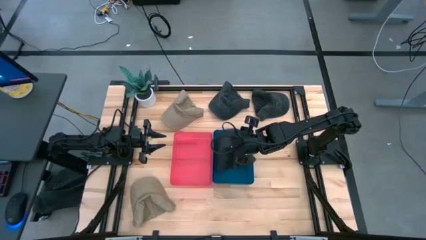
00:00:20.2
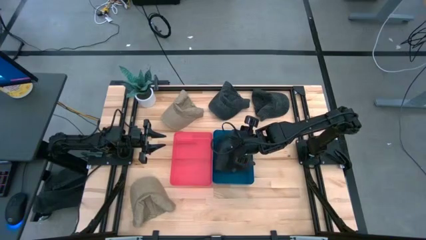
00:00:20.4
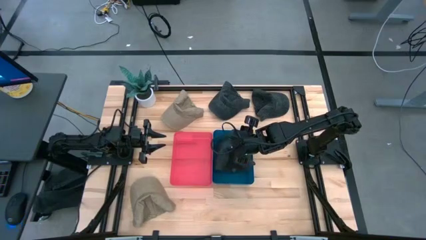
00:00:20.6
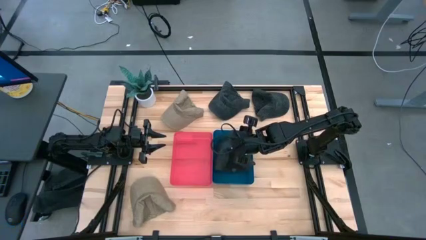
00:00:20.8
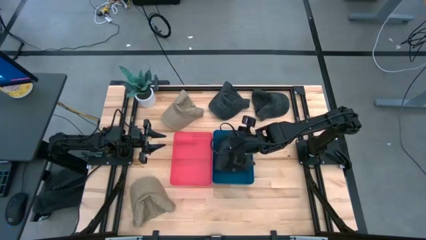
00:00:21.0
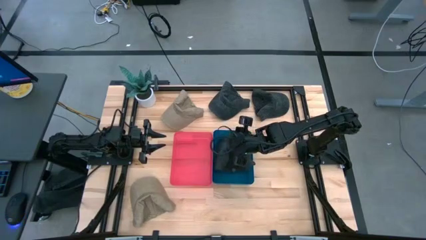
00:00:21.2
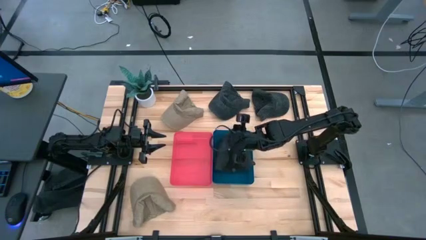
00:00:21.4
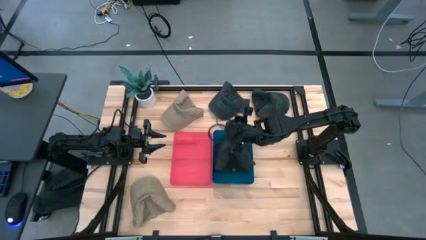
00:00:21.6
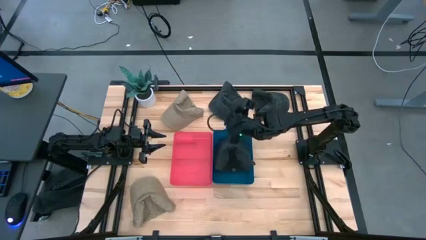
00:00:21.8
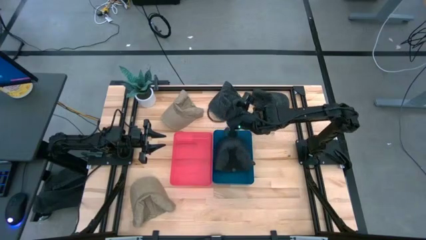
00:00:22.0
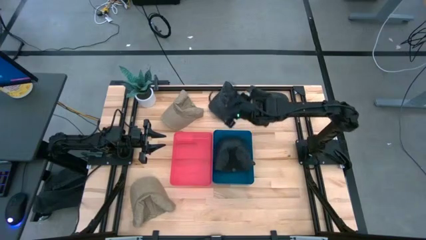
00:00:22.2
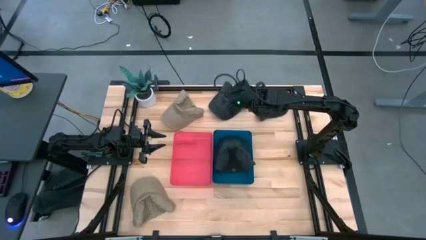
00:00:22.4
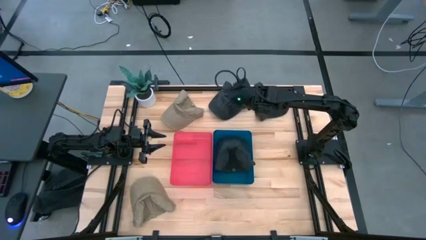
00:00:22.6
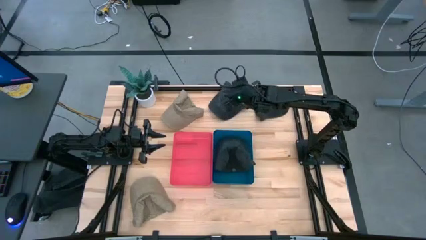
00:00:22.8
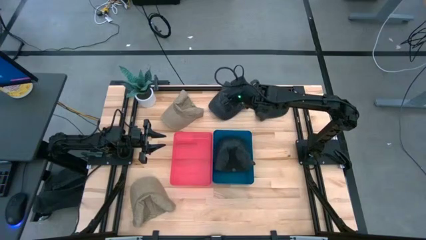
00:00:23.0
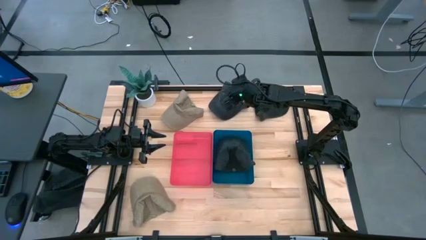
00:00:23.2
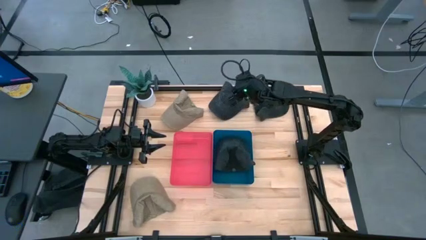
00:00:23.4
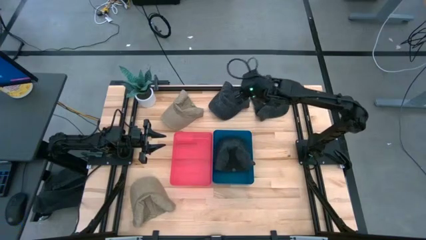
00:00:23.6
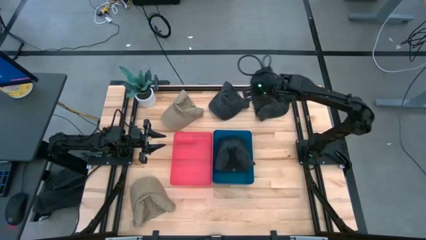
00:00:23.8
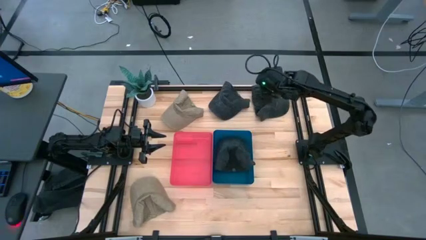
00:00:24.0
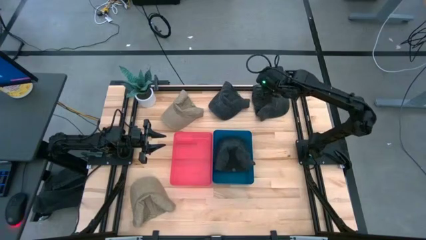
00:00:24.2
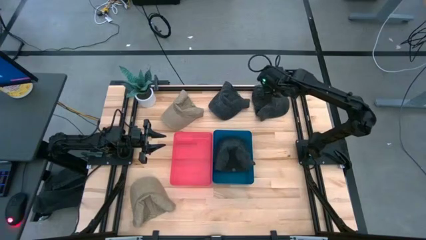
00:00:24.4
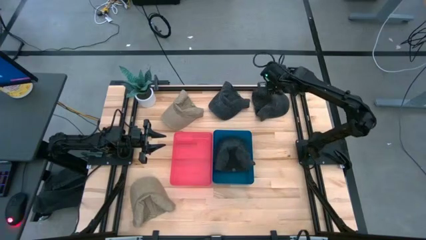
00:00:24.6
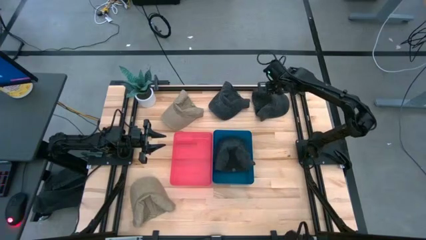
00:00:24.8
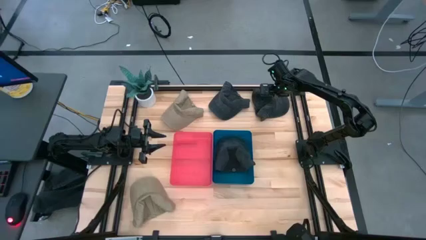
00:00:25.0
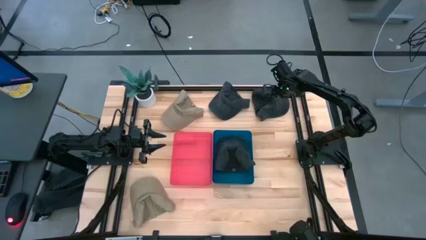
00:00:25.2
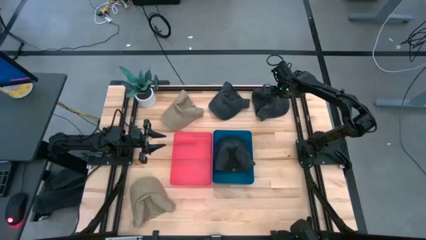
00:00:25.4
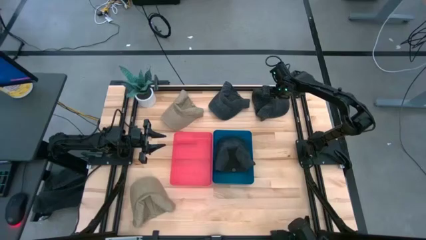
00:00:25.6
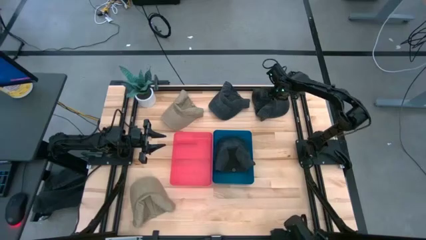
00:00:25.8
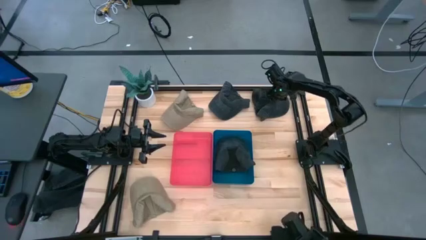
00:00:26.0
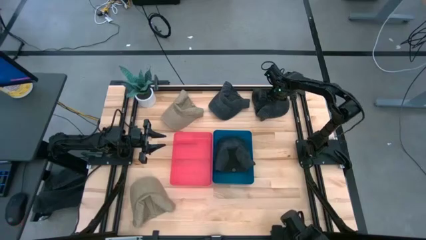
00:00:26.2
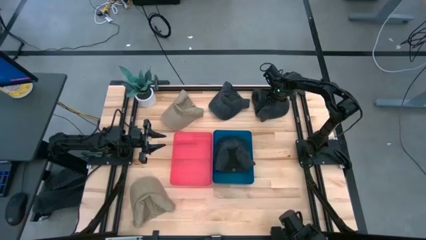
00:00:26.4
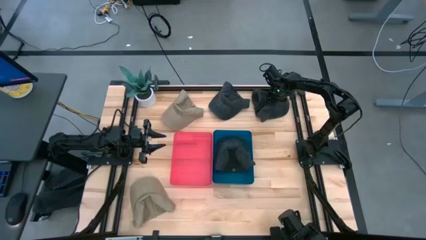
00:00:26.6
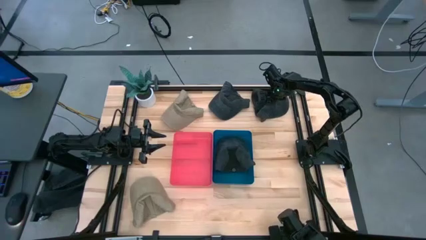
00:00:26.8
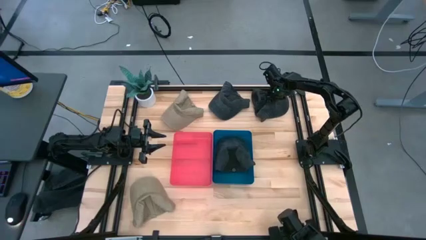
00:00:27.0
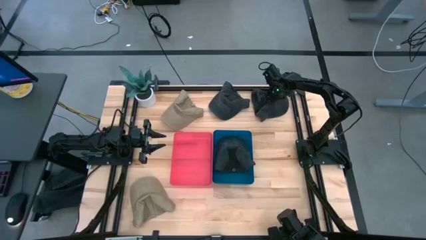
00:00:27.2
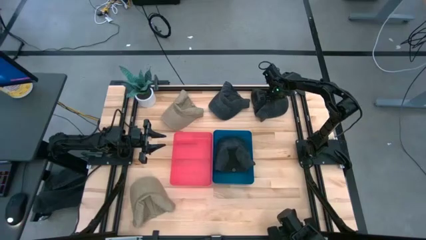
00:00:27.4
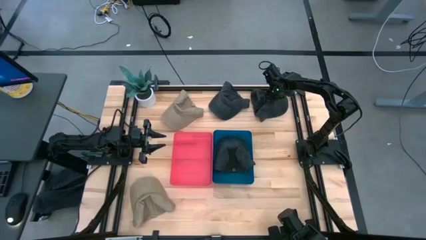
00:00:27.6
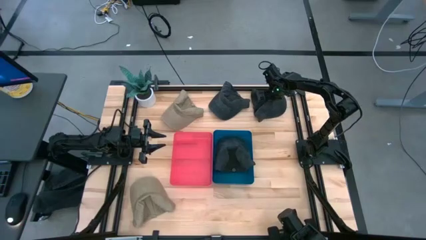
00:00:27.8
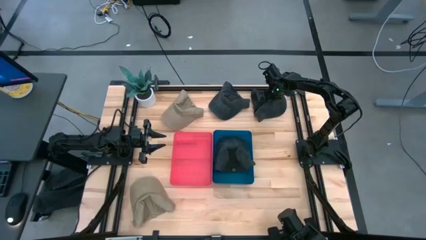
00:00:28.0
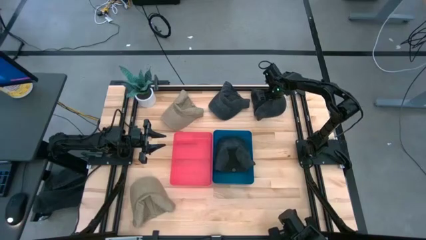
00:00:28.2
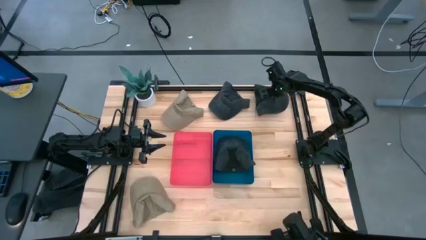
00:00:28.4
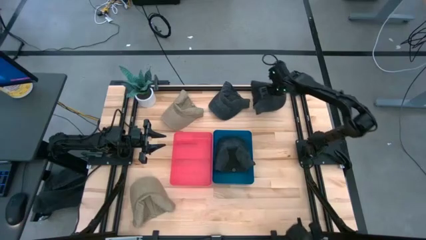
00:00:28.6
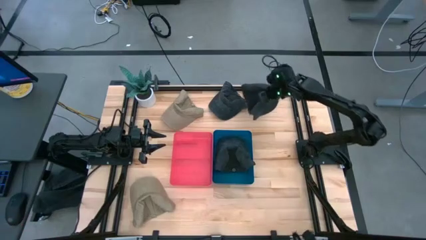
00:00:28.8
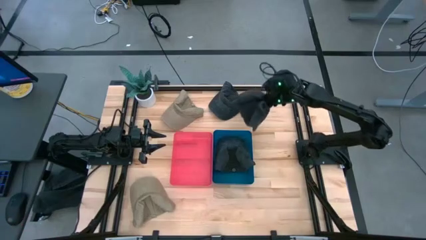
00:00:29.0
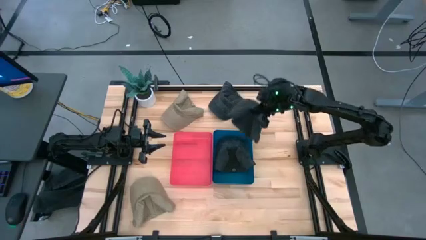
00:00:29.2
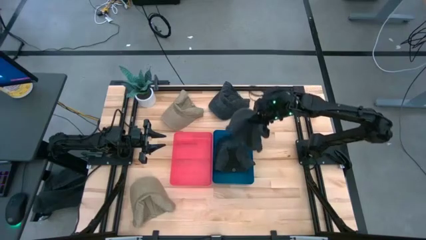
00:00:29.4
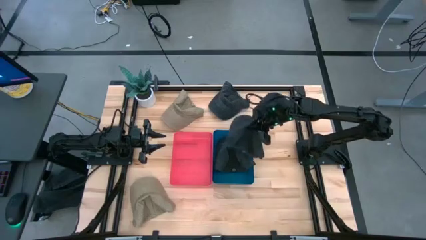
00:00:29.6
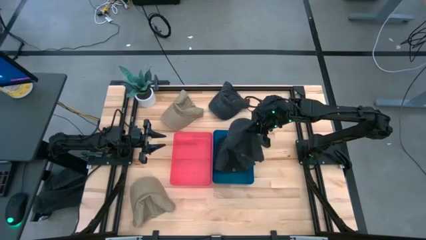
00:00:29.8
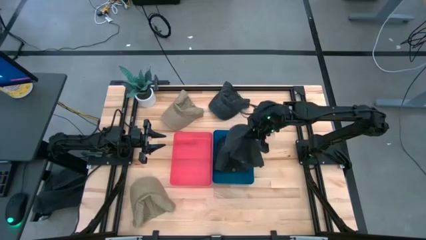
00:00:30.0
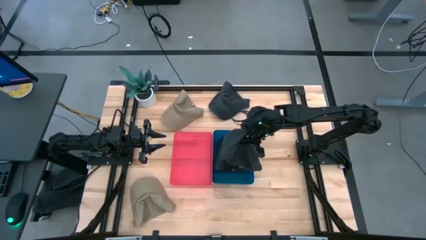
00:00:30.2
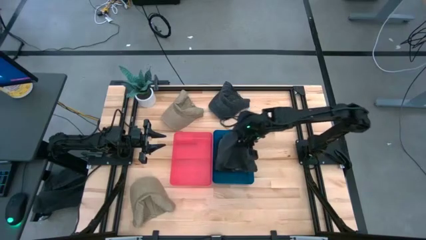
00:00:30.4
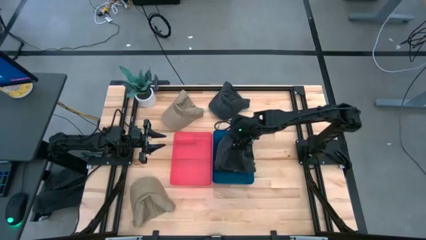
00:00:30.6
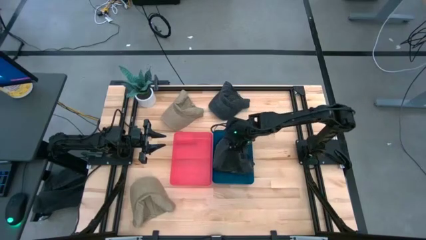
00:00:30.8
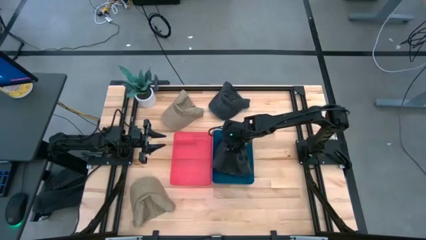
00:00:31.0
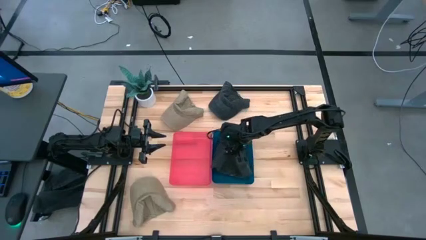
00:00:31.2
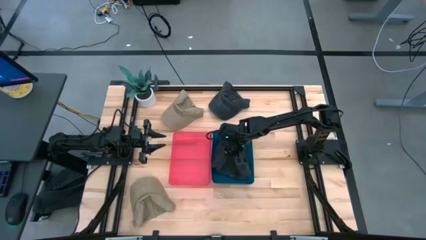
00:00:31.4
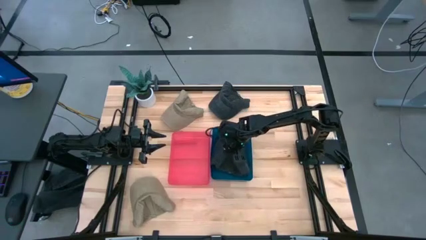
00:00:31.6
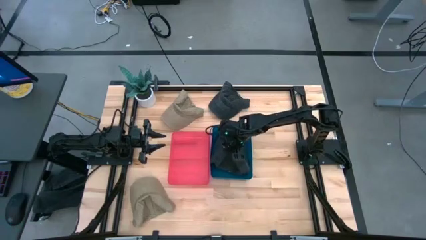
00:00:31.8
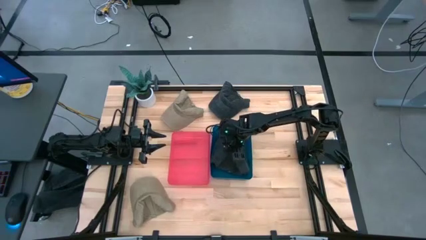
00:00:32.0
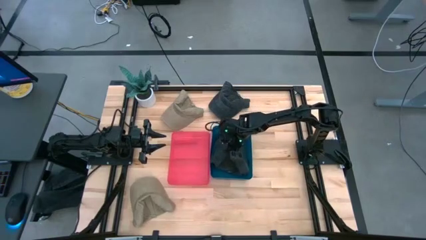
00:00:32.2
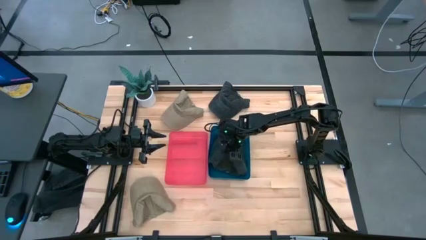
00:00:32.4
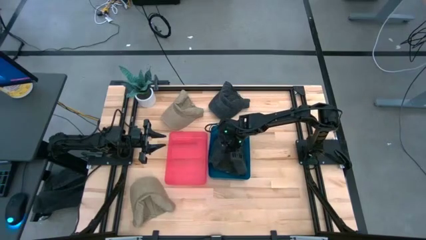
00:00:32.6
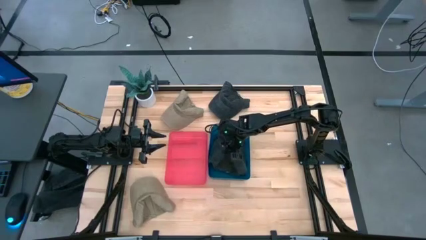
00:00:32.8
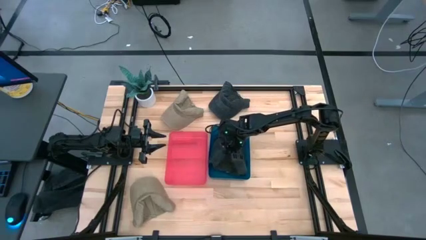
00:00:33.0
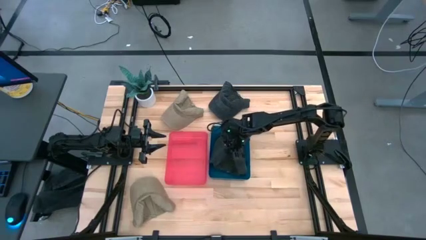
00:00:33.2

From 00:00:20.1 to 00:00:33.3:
Task: Pick & Place hat
Put the right black cap into the blue bin

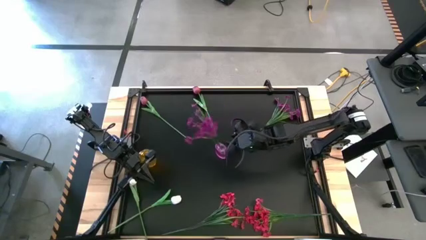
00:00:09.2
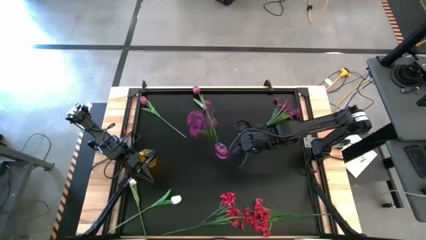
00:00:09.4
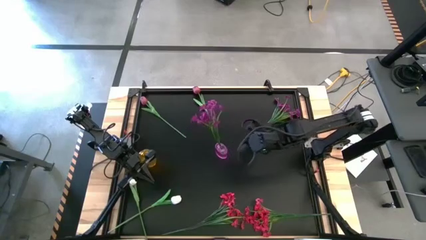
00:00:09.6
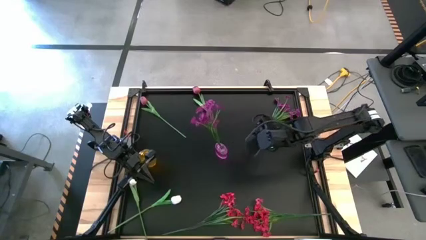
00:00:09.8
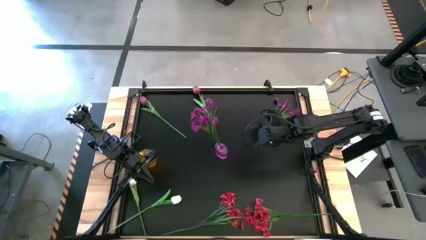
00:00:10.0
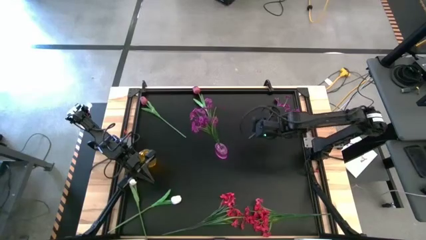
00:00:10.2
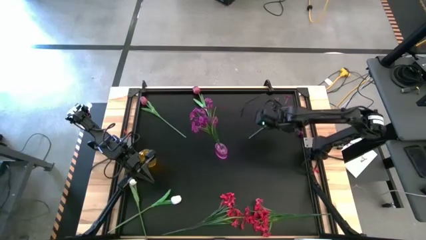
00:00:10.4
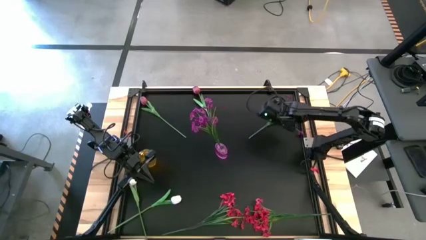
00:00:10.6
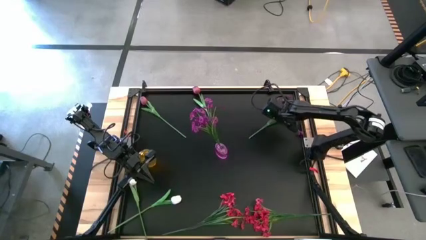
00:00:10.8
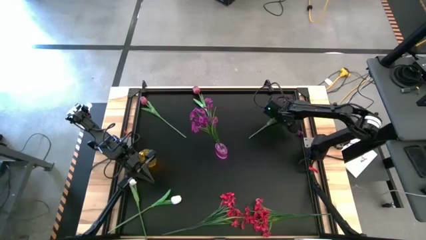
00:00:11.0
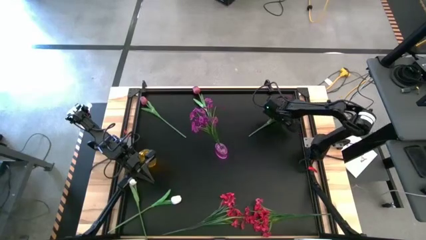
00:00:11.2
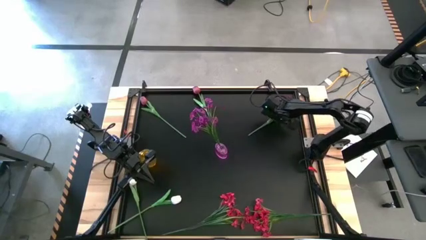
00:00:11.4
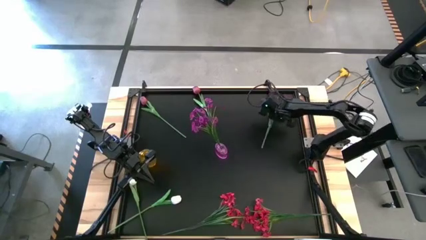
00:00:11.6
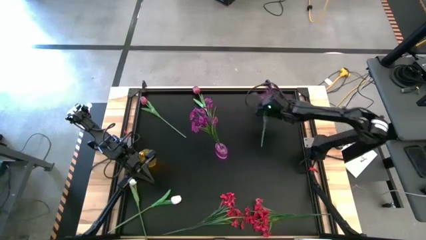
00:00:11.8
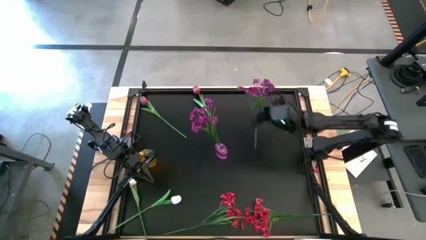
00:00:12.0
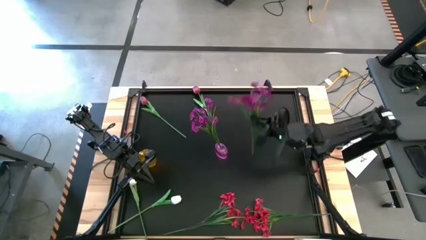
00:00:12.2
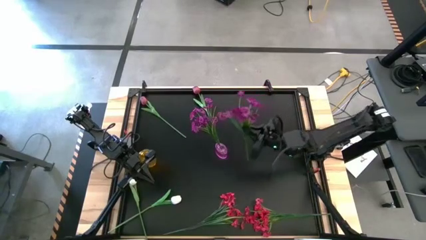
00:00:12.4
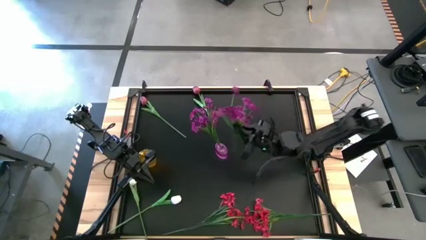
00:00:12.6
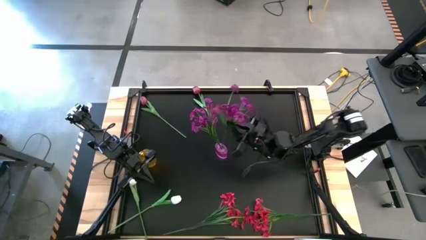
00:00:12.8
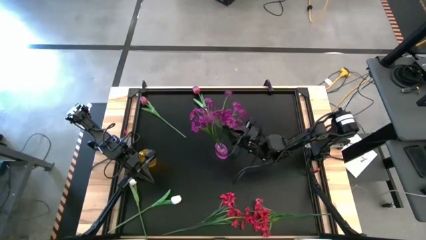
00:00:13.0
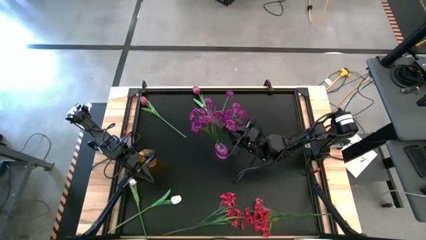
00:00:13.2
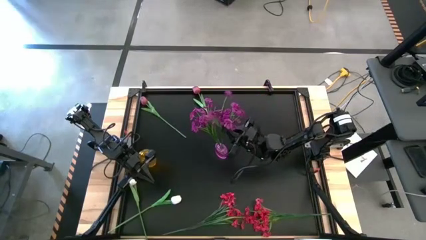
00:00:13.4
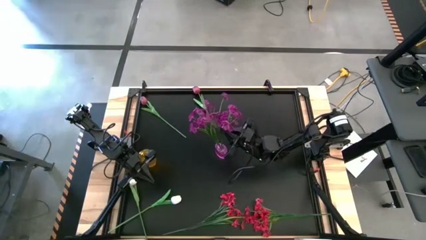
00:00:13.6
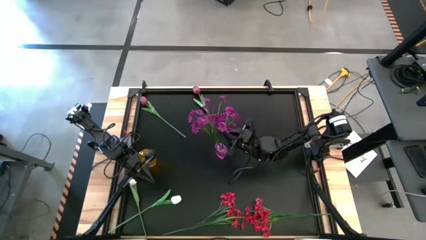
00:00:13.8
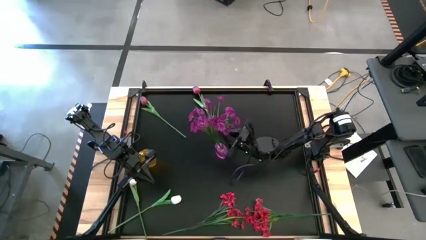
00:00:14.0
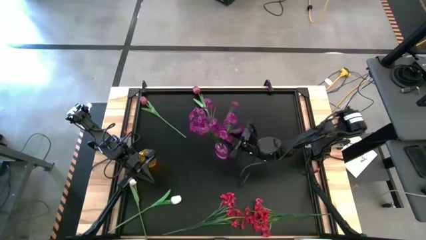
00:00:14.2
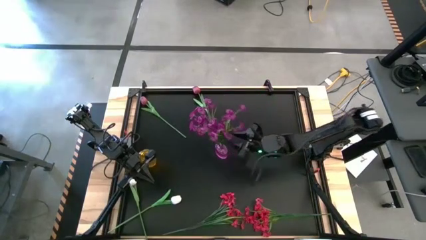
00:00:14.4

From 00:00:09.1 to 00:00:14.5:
Task: Sort flowers into vase by color
Put the violet flower into the violet flower vase
